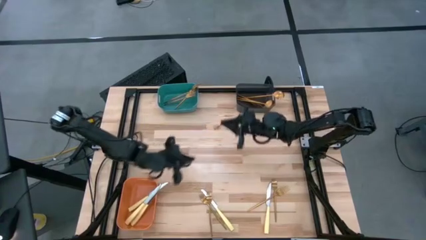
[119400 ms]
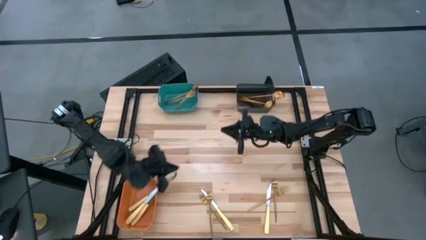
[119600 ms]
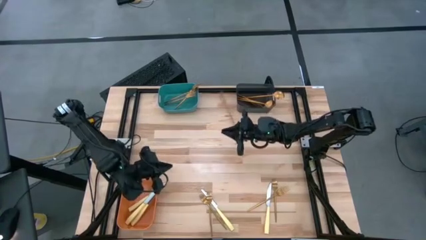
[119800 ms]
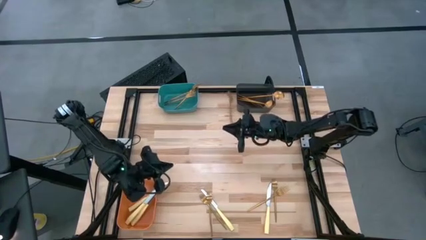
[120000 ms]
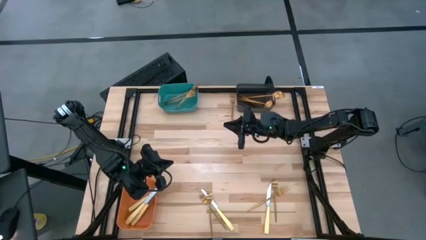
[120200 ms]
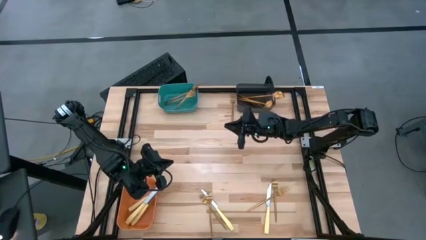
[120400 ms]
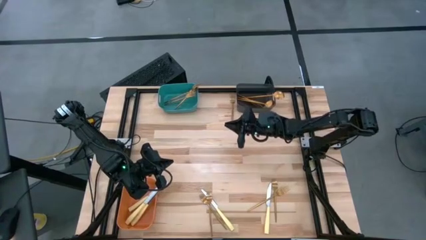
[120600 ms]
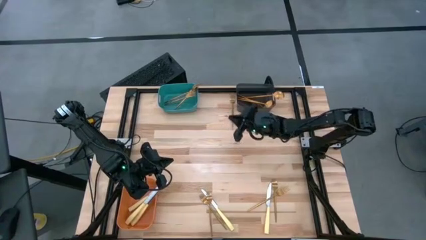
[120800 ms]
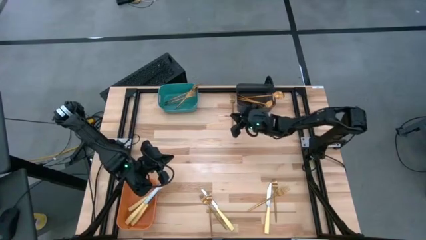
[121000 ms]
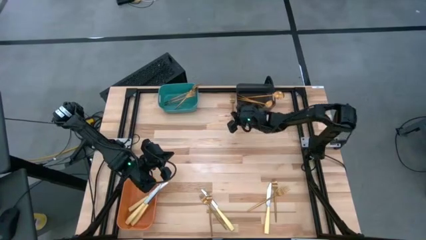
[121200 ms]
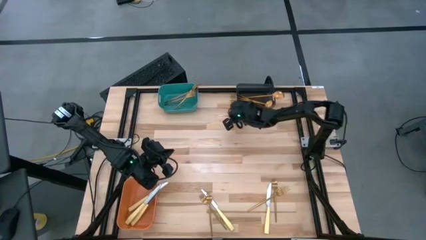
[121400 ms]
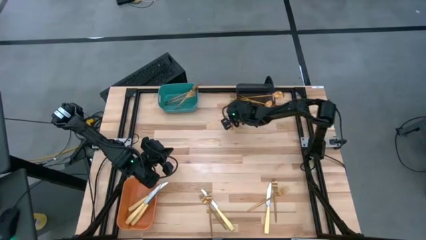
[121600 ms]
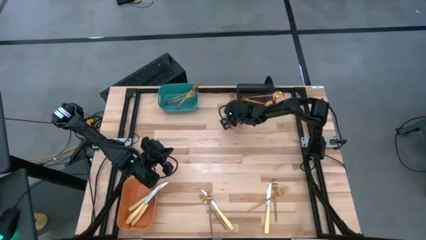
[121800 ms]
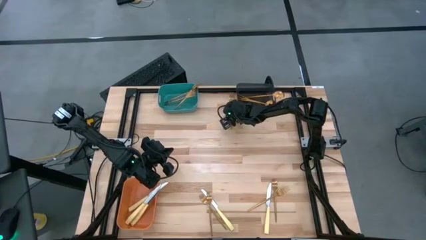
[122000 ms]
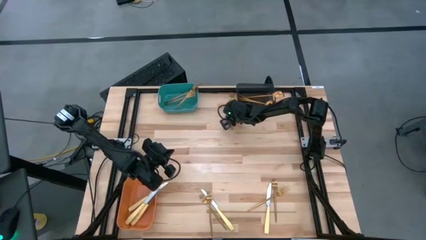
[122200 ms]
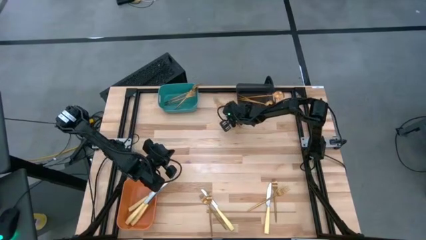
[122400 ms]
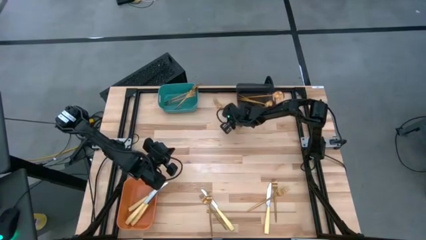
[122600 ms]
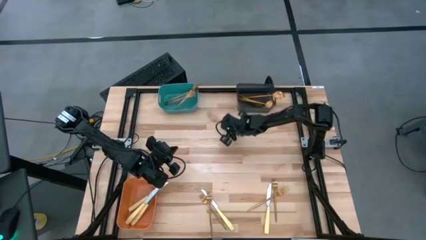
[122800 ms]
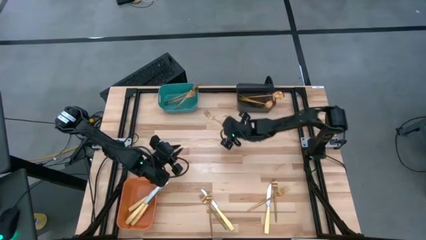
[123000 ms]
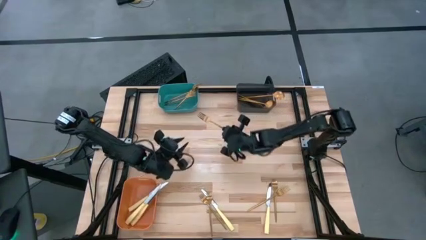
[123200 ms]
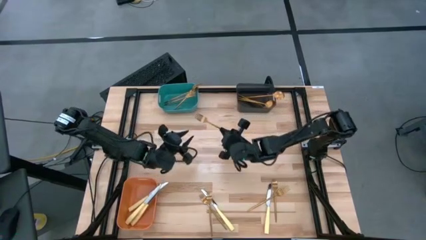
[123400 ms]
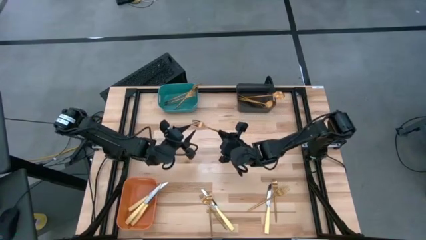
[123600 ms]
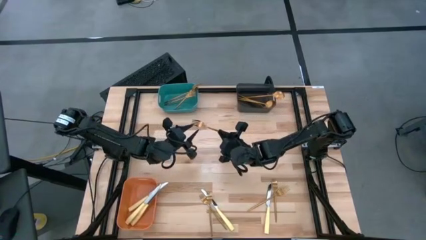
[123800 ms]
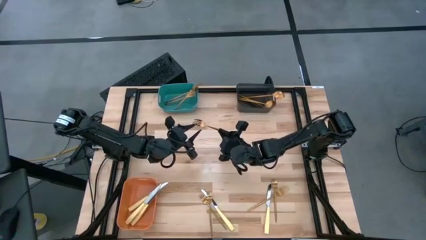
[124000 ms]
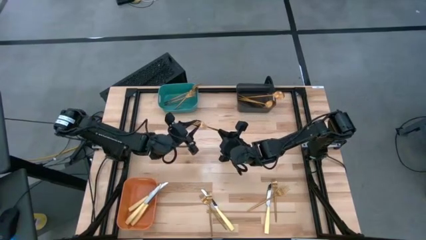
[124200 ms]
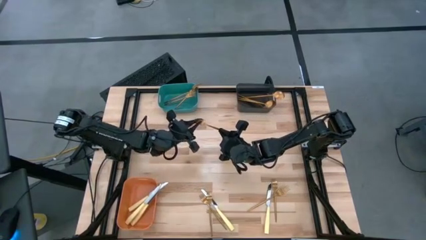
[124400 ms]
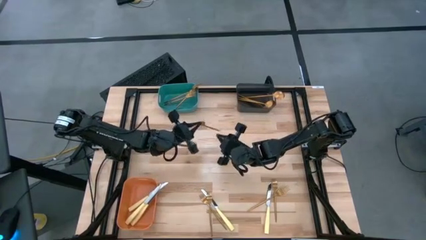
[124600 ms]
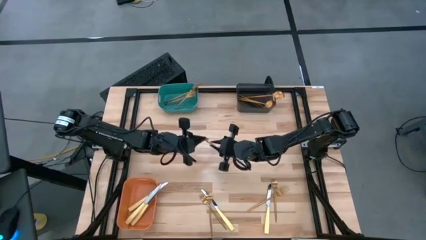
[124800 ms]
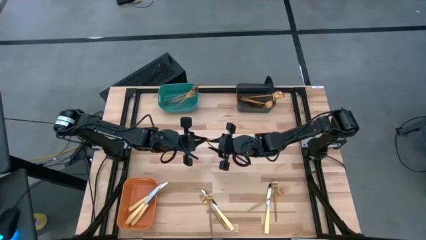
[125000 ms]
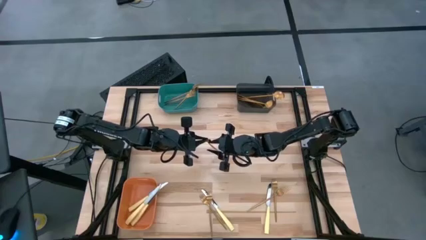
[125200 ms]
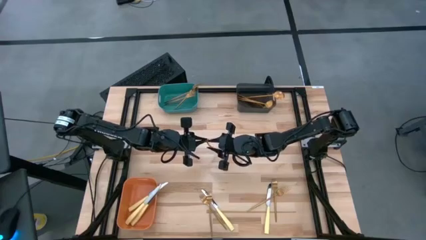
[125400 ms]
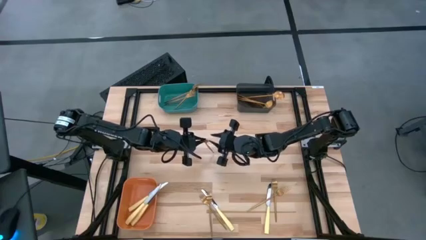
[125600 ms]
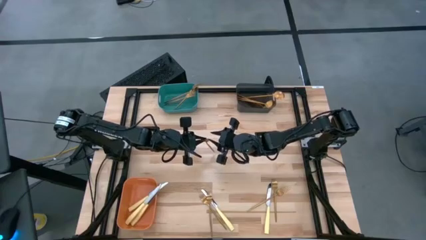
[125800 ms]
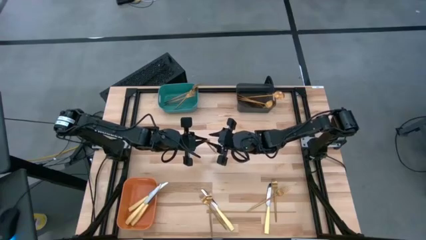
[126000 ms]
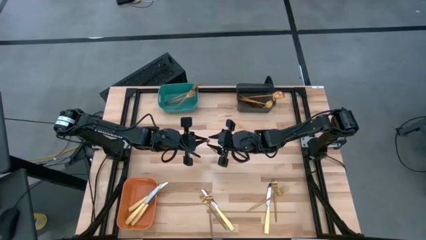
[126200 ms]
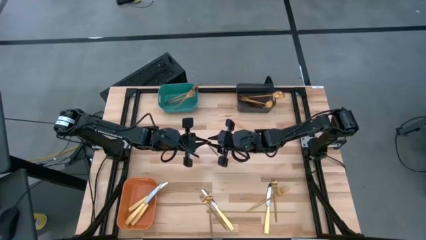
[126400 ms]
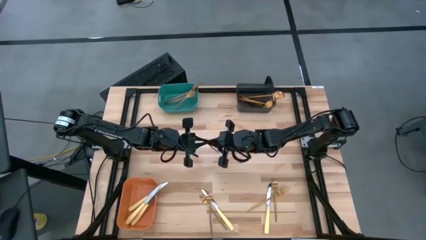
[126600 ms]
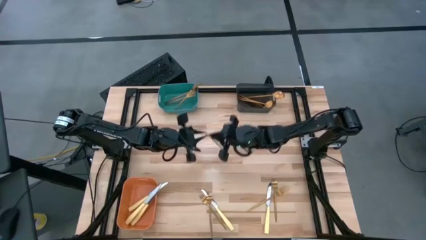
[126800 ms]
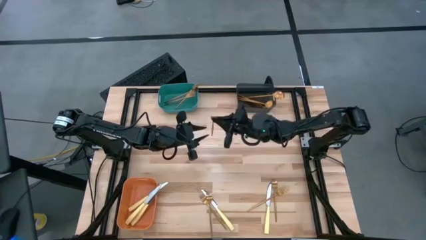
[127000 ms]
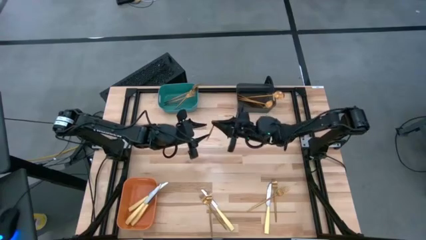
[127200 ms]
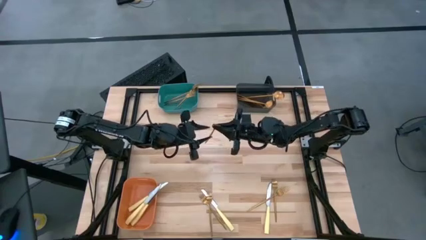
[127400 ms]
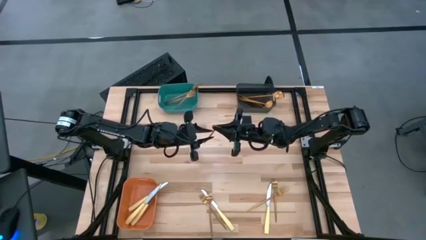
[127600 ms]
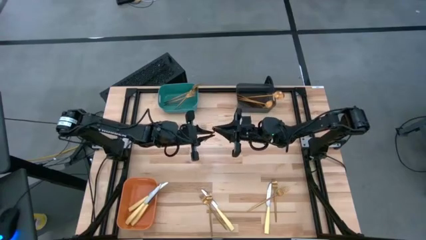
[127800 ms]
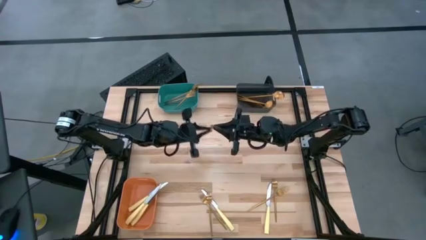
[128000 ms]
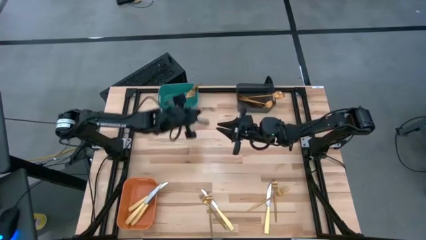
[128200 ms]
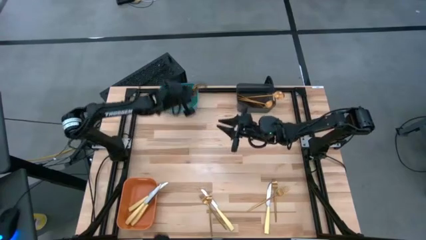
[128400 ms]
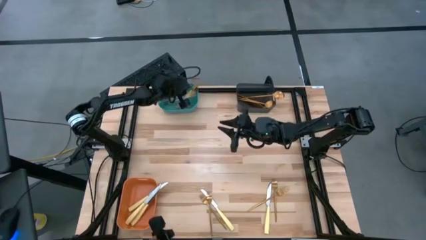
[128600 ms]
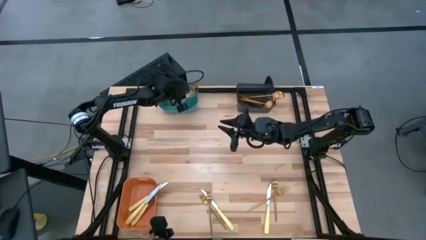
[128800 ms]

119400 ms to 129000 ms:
Task: Sort silverware by color (type)
Put the gold fork into the green bin

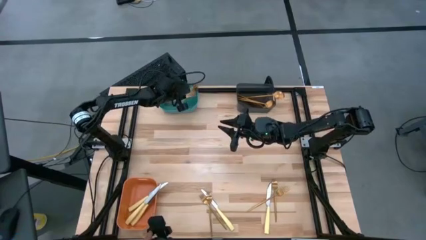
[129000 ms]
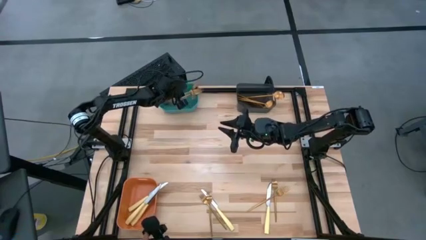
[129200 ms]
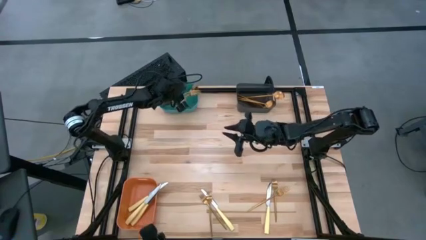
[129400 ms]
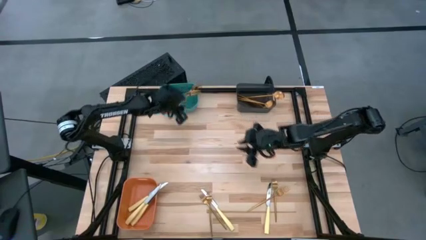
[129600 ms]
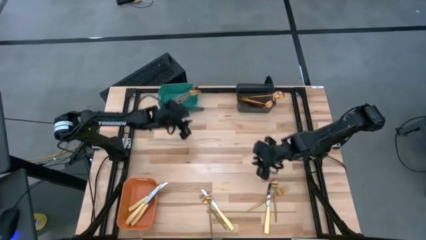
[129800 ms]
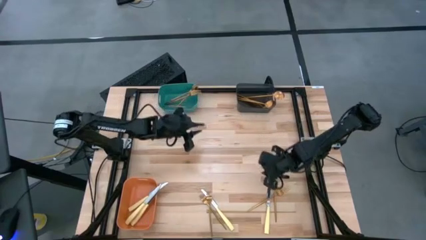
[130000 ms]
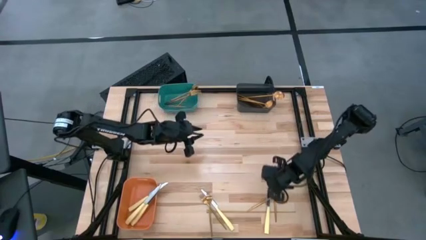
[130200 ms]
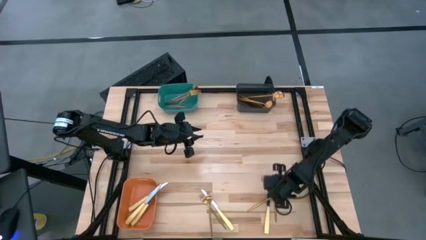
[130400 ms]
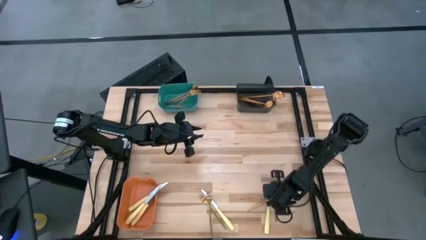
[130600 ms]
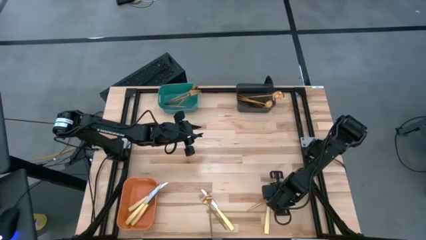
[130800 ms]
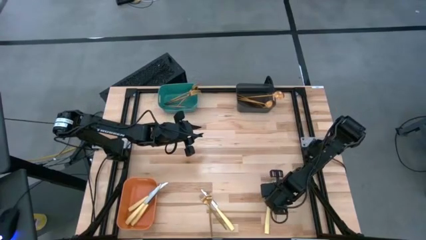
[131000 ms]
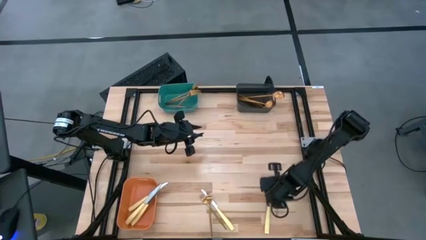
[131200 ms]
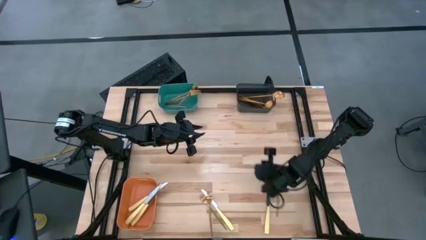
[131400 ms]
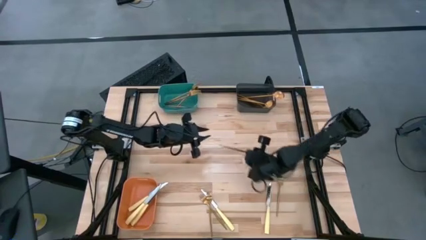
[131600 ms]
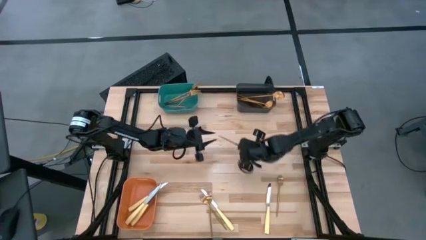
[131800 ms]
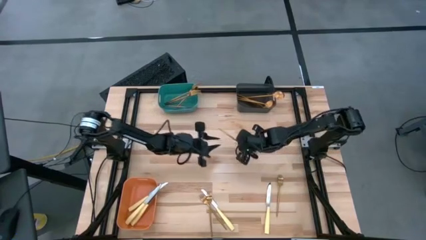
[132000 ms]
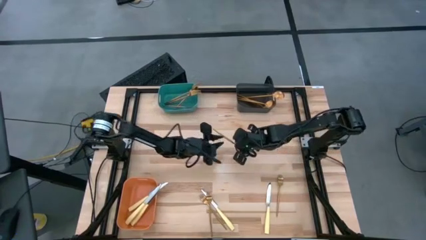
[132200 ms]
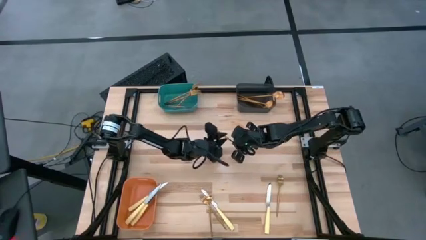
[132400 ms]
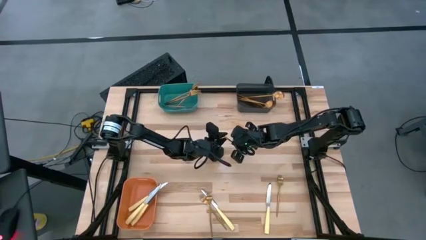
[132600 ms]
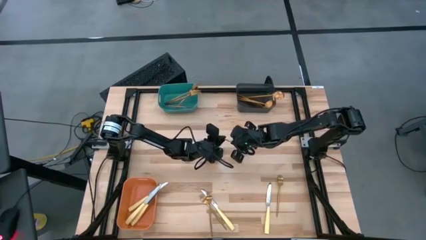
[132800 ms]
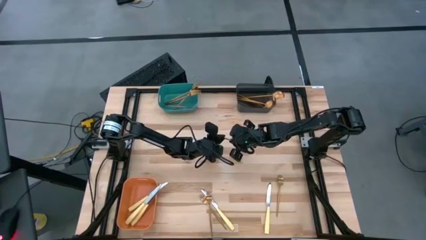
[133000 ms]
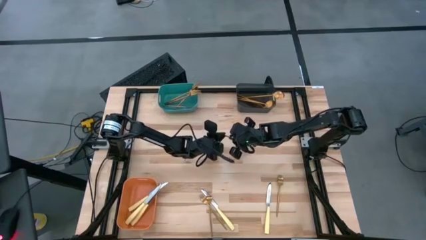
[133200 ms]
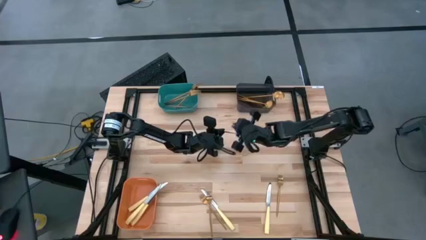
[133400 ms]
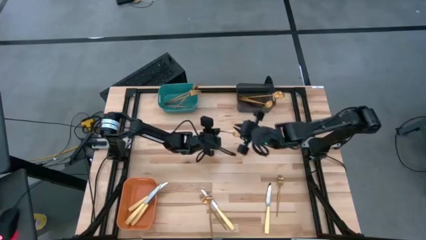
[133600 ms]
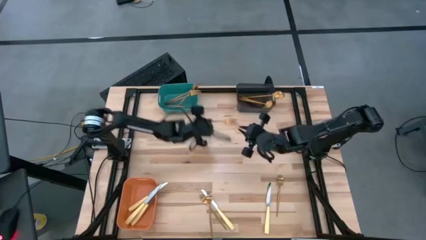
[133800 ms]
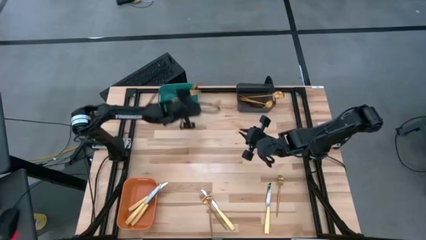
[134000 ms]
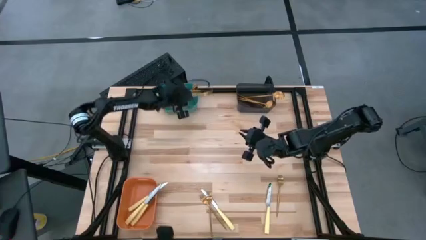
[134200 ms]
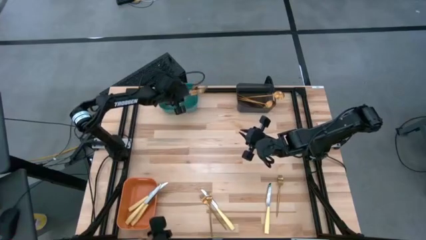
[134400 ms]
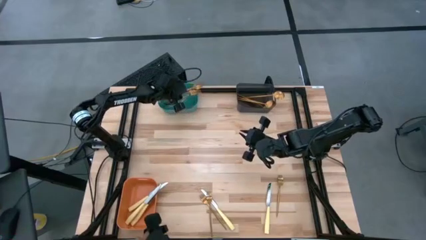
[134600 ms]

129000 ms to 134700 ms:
Put the gold fork into the green bin
